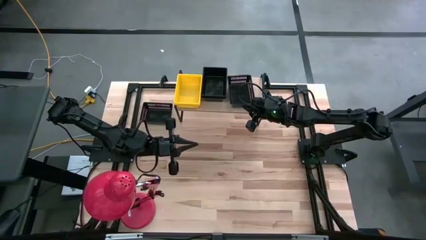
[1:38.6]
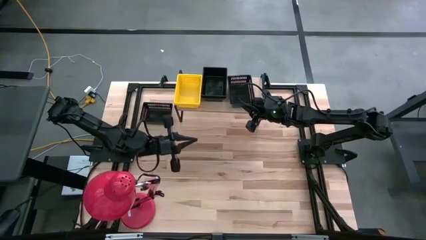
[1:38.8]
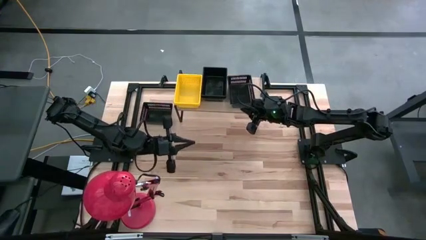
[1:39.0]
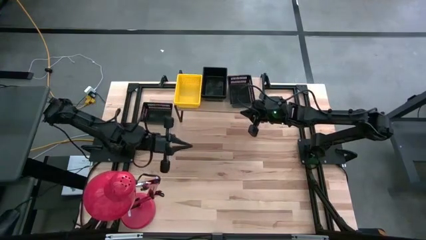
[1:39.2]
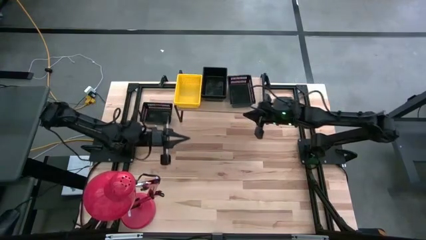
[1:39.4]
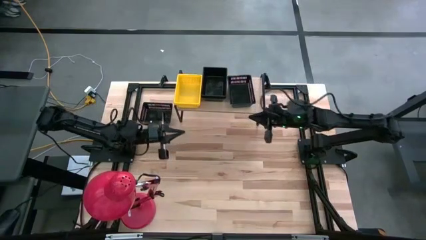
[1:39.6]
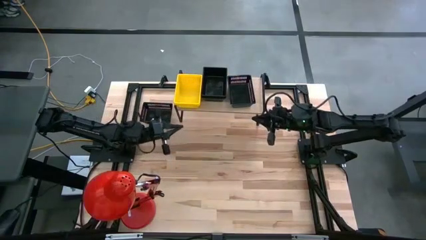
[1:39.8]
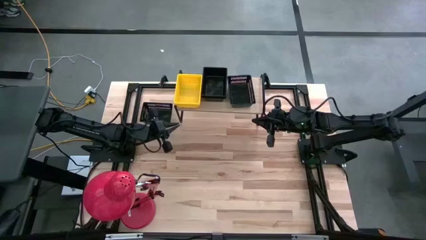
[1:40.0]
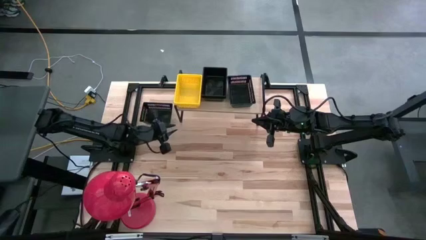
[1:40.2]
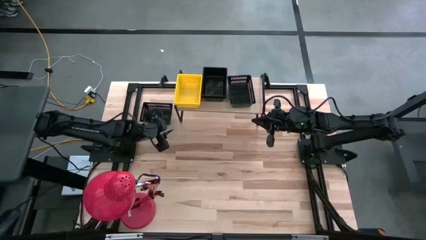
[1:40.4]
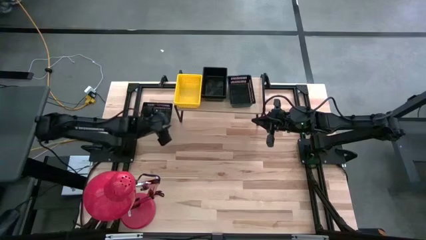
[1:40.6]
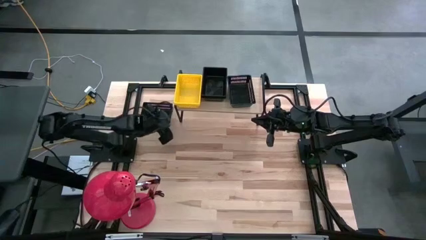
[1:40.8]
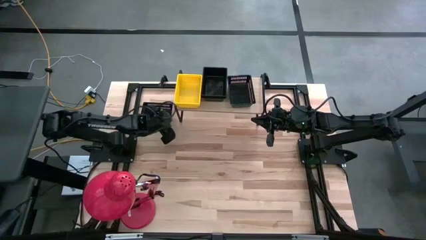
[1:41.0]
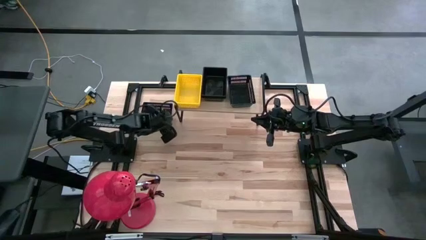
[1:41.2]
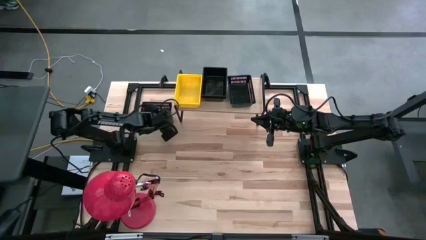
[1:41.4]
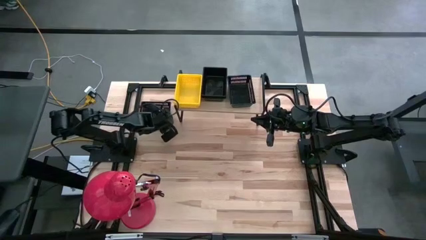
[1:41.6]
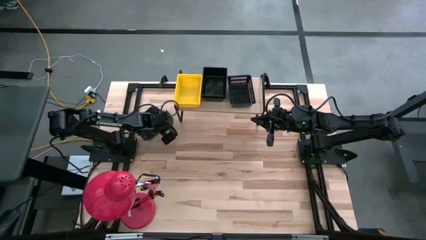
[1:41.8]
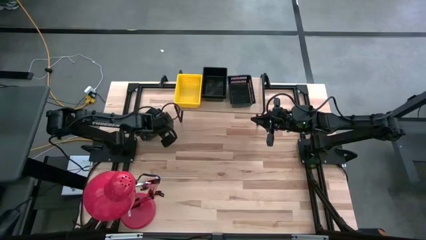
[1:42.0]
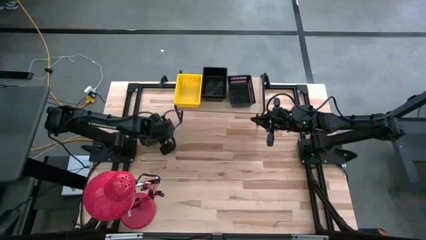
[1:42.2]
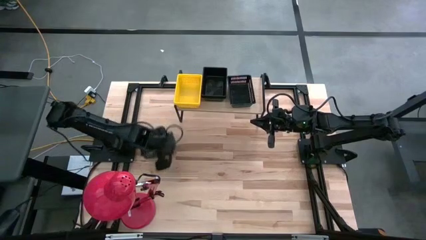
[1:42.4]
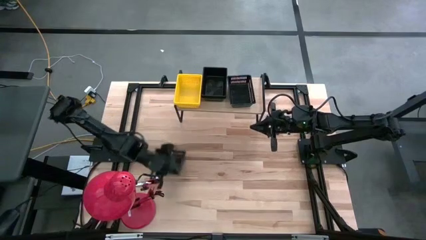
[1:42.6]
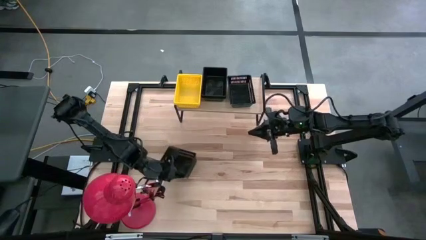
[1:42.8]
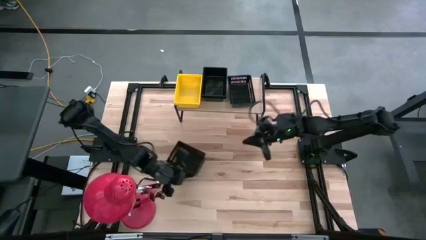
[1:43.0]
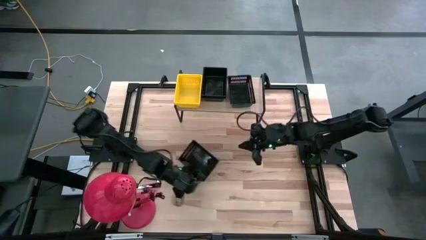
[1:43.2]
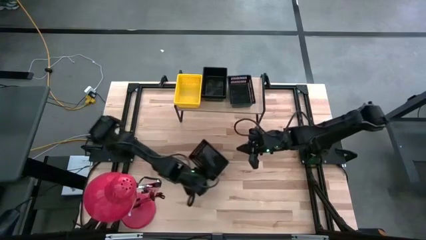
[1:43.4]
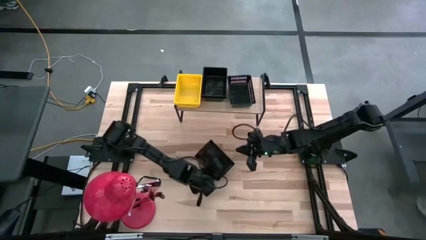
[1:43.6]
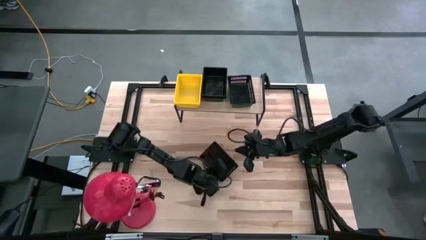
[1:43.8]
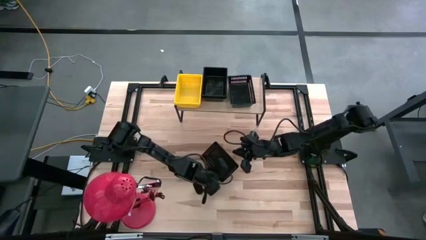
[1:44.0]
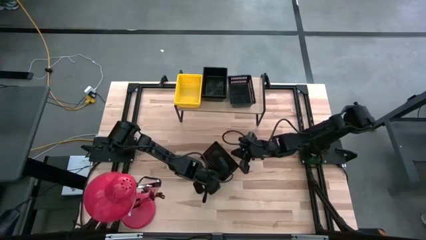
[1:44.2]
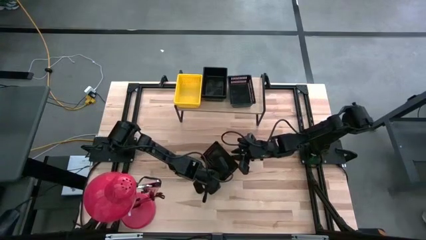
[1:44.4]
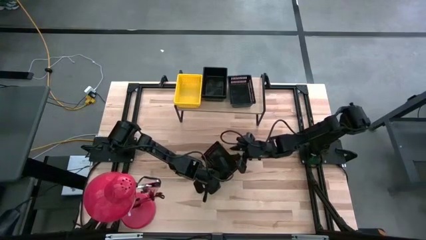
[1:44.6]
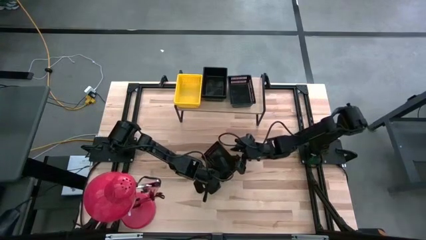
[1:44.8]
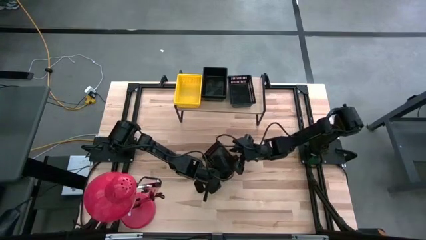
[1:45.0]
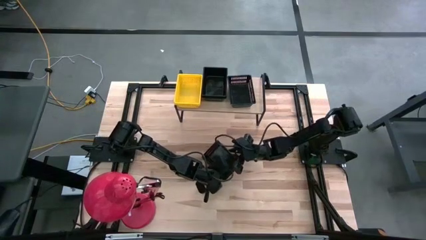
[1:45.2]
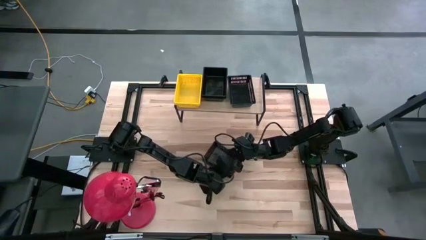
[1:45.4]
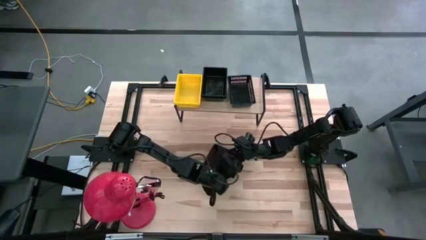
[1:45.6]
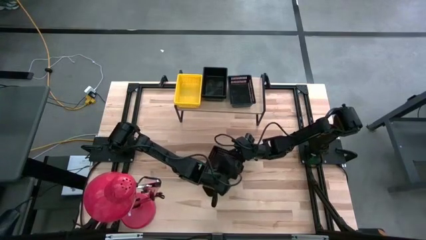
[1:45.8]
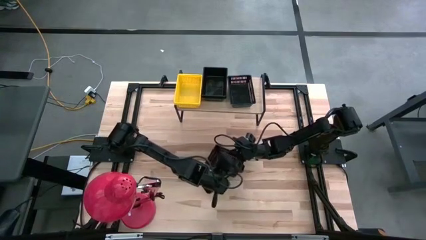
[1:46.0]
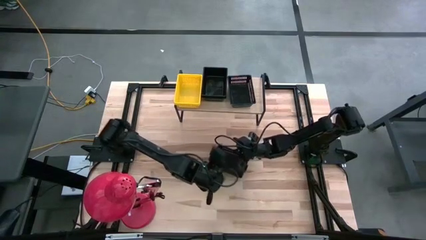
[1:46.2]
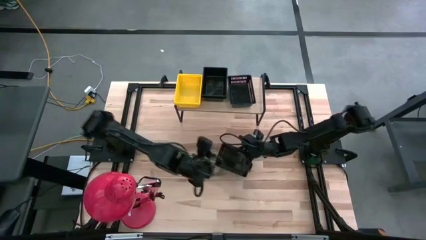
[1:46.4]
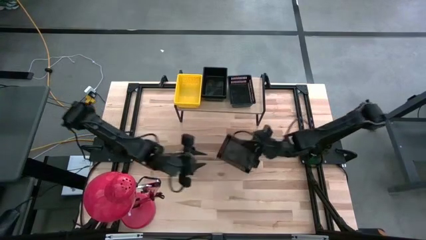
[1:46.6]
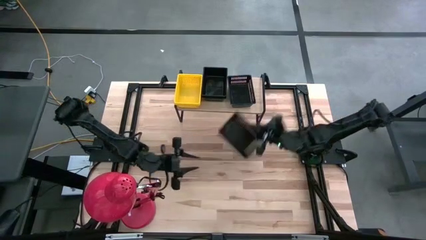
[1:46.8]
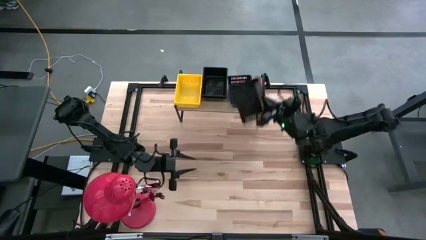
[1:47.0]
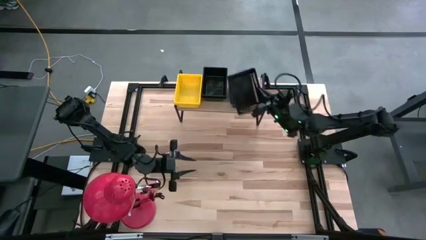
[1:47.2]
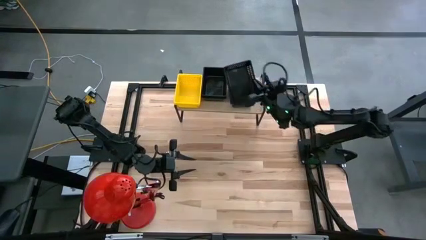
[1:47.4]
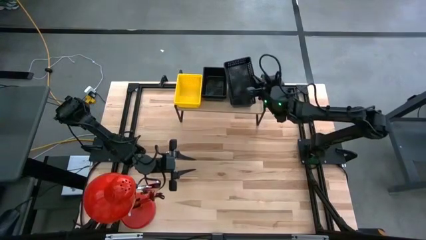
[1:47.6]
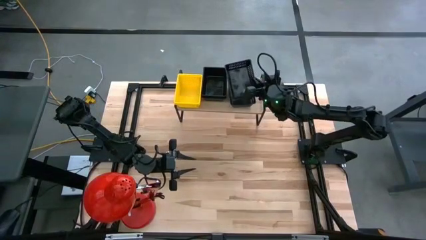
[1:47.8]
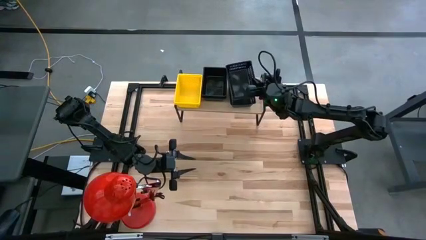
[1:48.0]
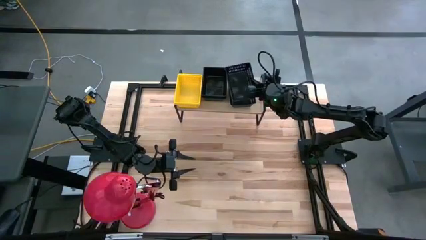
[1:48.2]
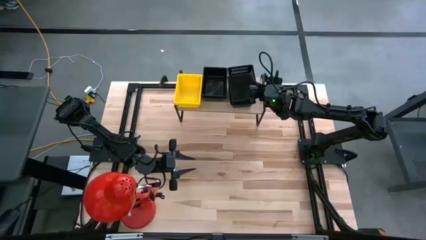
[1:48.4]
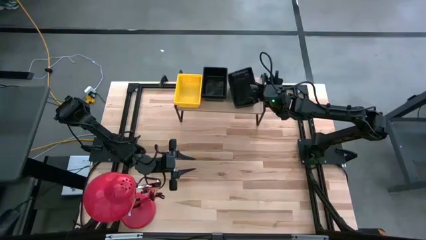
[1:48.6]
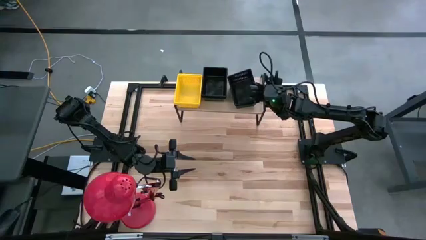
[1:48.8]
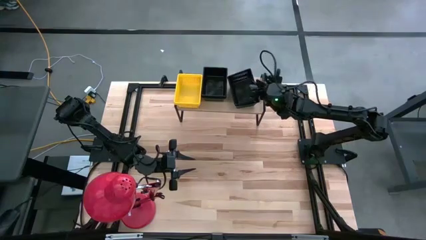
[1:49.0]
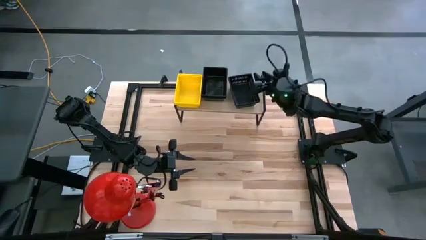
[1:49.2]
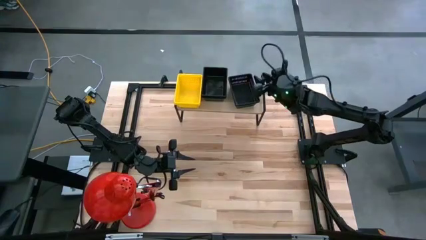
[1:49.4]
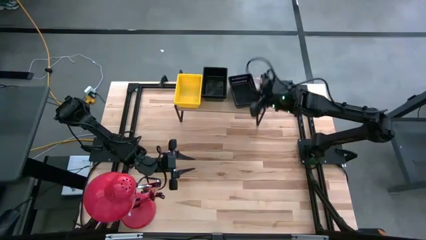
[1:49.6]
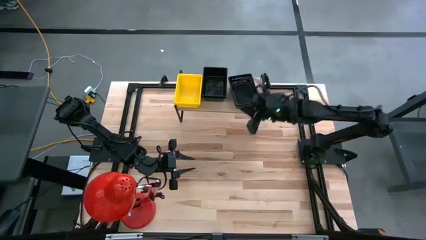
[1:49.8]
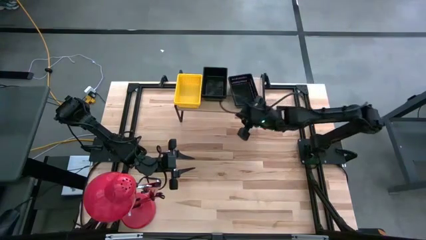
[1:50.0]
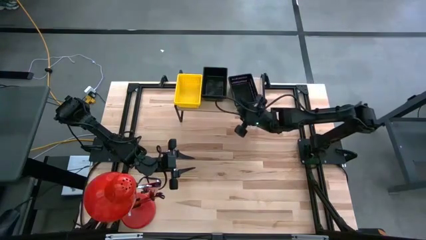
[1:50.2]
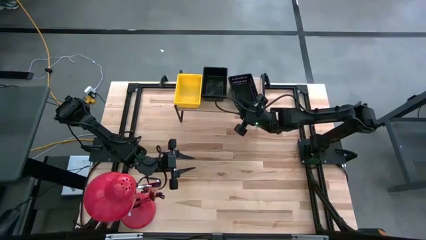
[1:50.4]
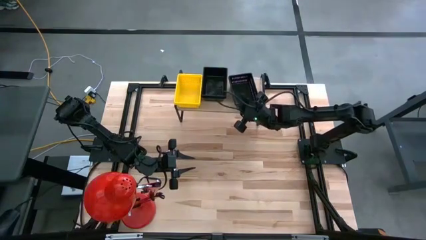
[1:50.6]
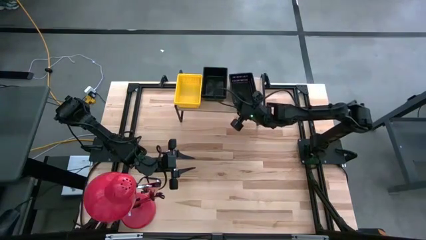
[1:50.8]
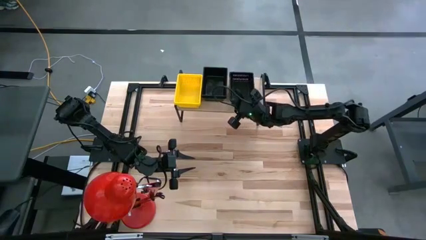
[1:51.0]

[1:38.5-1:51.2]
Task: Stack baskets on shelf by color
Stack the black bin on the black bin on the shelf
